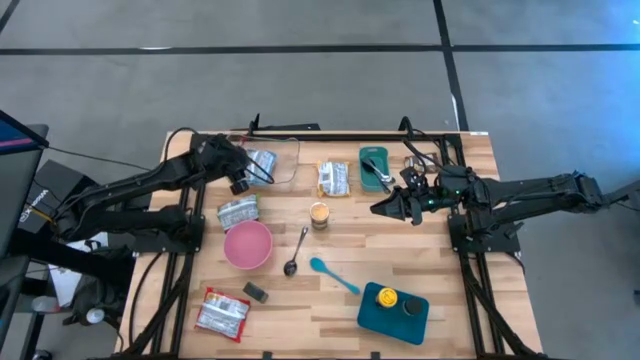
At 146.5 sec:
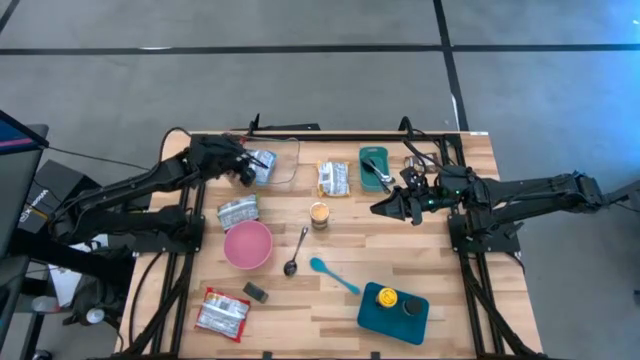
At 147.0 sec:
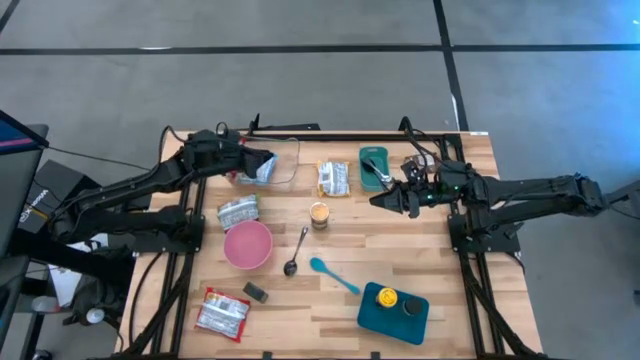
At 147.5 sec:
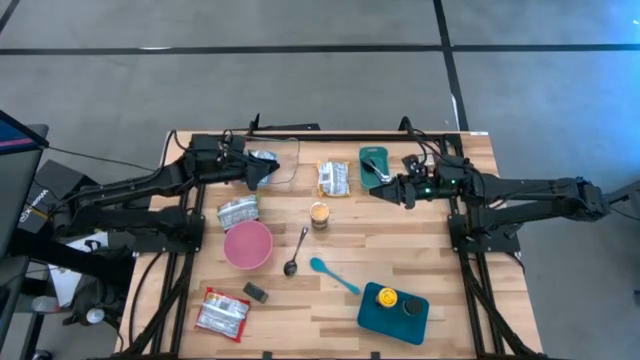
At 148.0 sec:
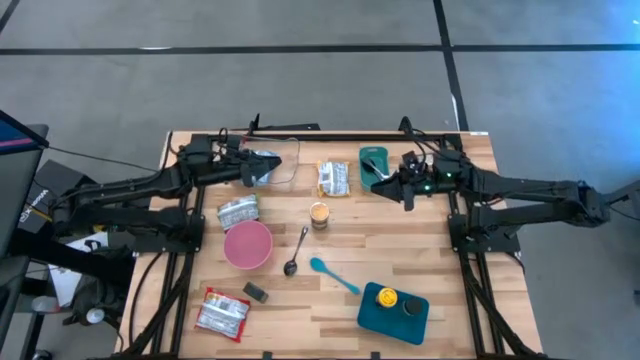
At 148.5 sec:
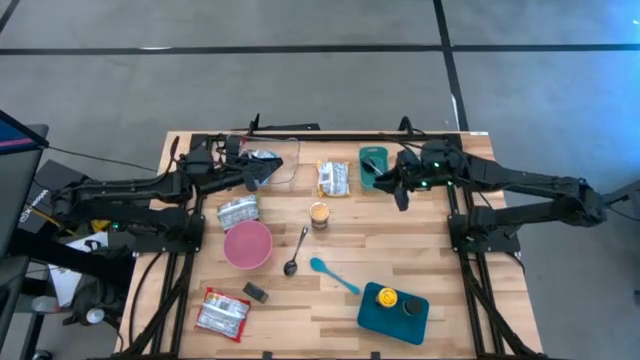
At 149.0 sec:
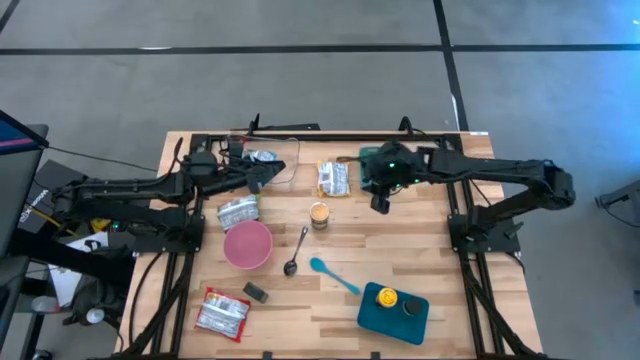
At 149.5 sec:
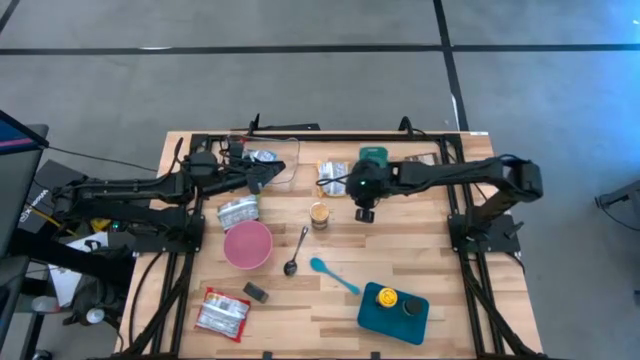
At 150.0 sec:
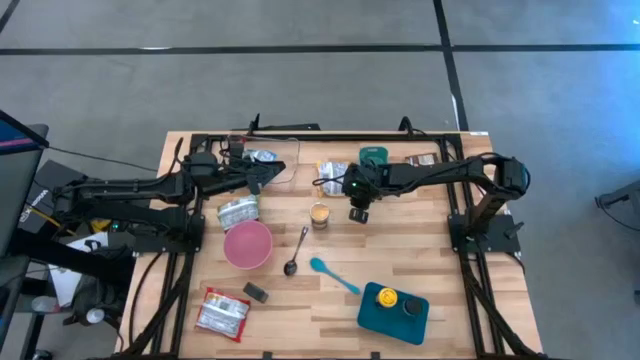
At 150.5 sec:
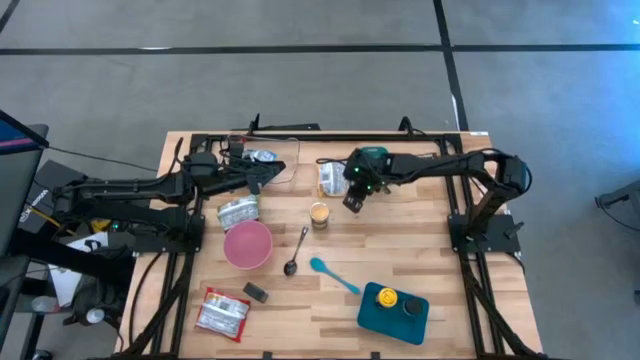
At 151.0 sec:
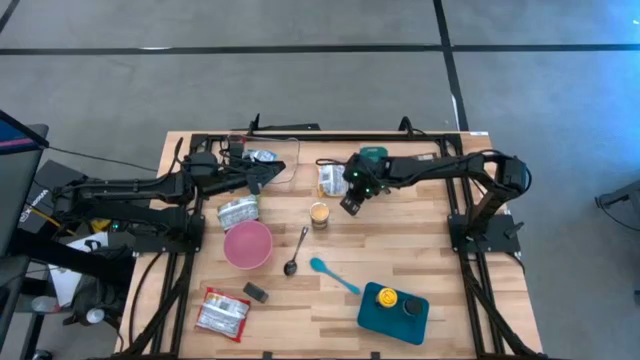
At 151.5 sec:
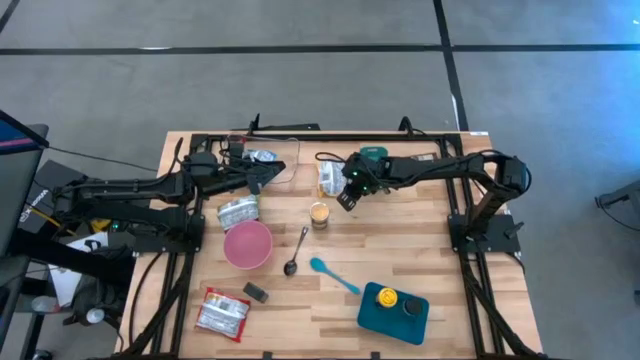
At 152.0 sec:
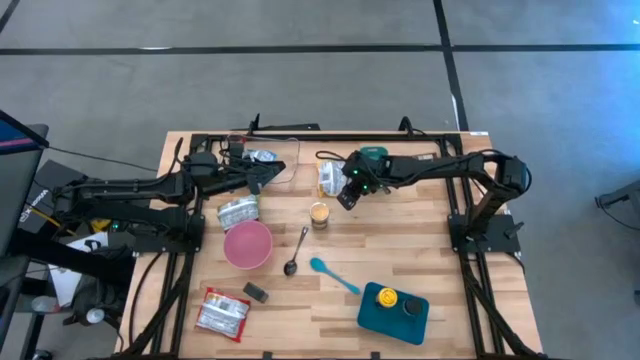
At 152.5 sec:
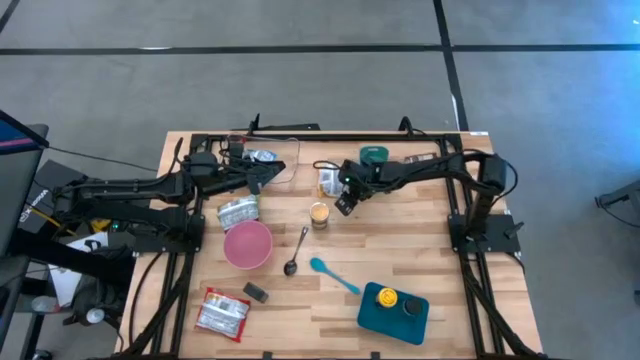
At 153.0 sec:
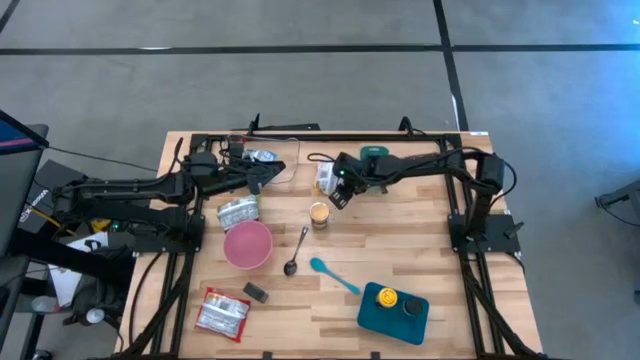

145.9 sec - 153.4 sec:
Task: Pick & Place Food Item
Put the yellow noodle pack into the transparent bin

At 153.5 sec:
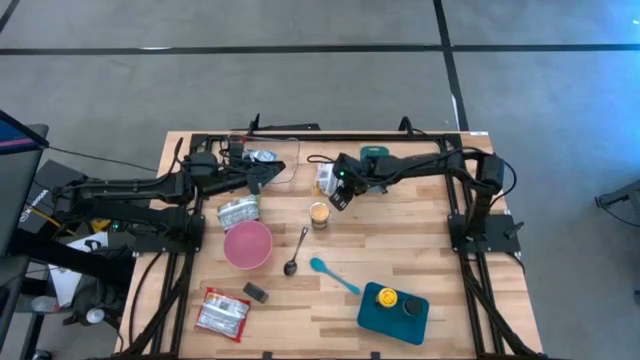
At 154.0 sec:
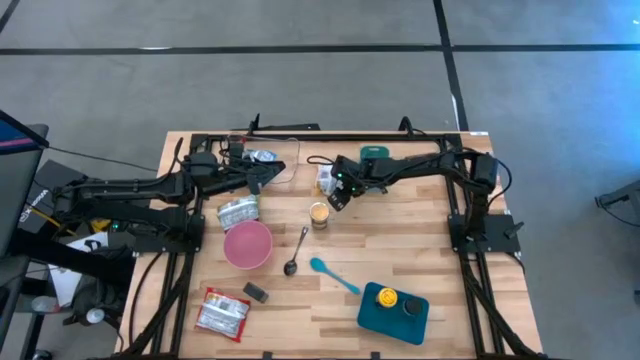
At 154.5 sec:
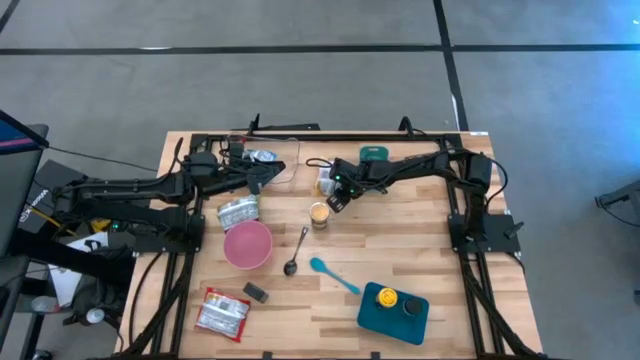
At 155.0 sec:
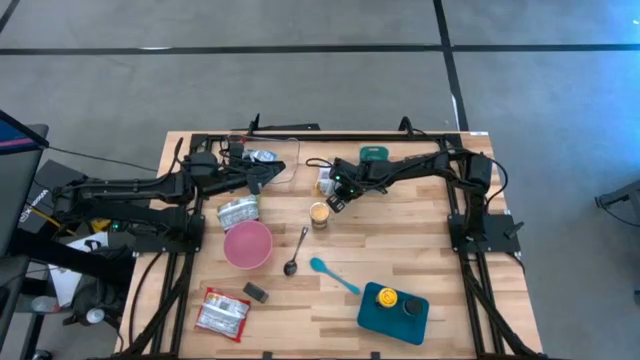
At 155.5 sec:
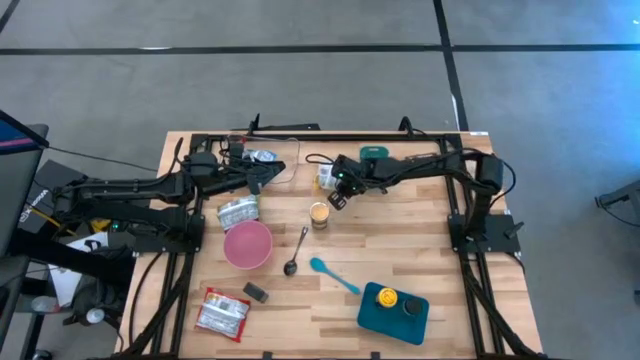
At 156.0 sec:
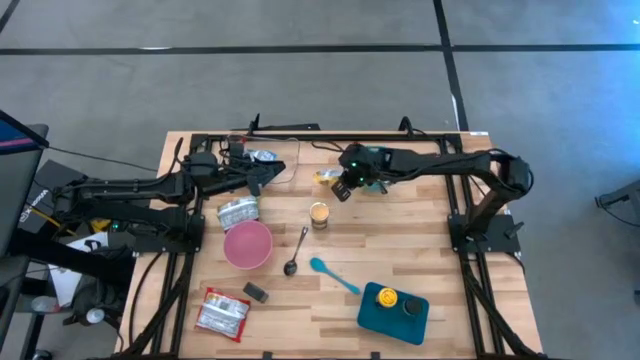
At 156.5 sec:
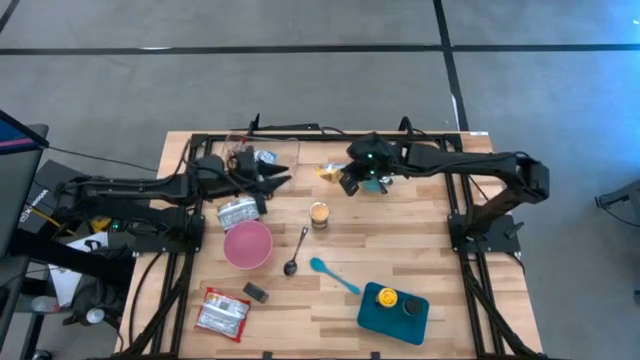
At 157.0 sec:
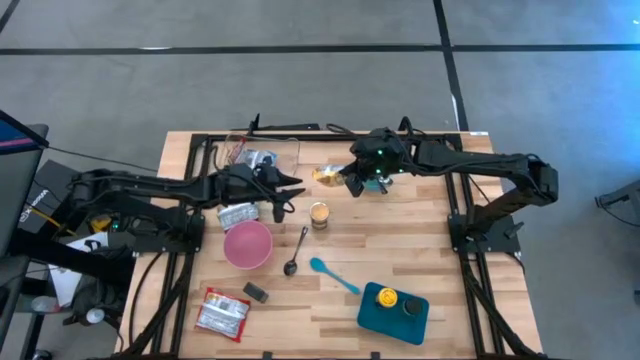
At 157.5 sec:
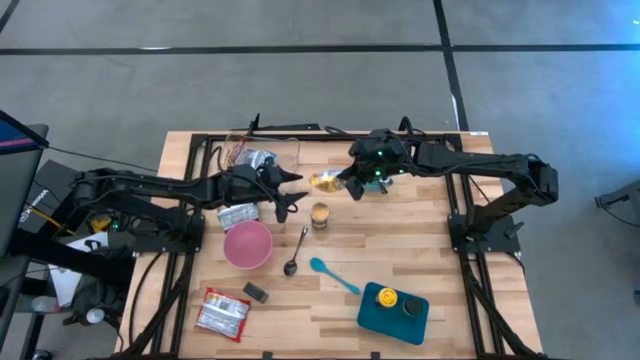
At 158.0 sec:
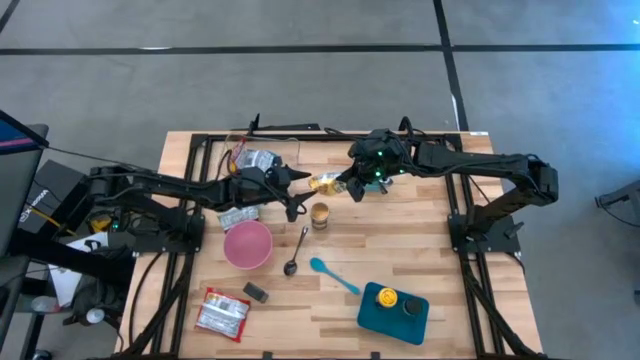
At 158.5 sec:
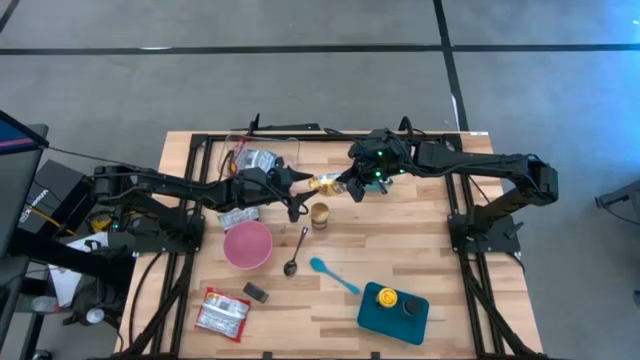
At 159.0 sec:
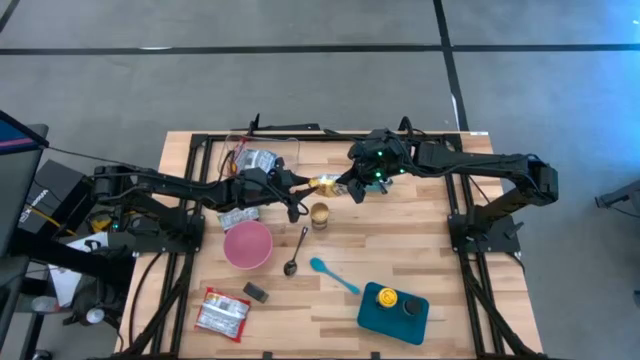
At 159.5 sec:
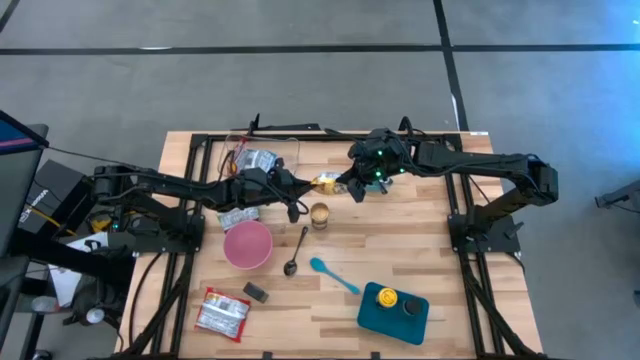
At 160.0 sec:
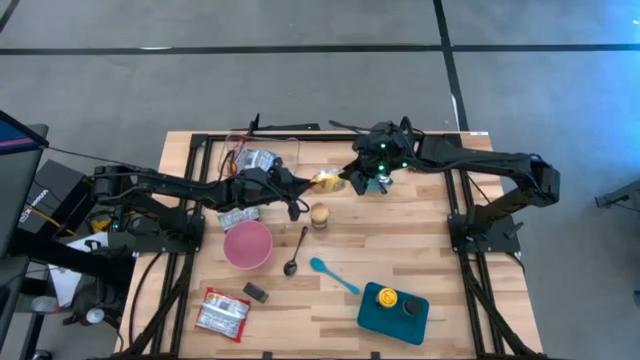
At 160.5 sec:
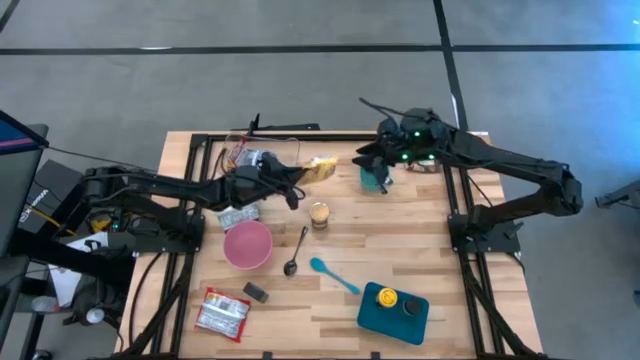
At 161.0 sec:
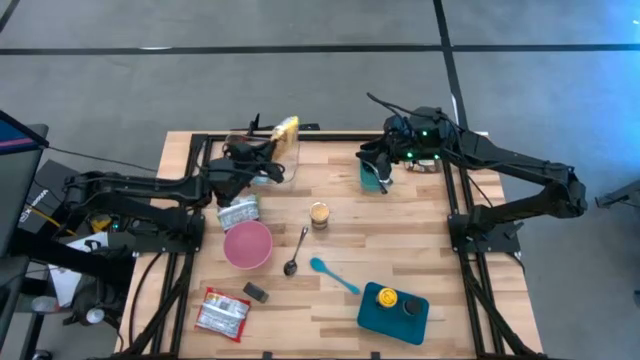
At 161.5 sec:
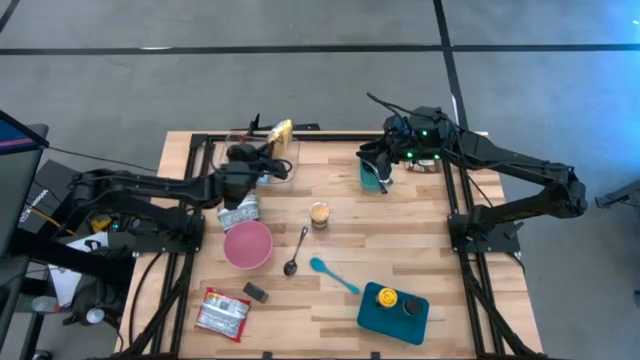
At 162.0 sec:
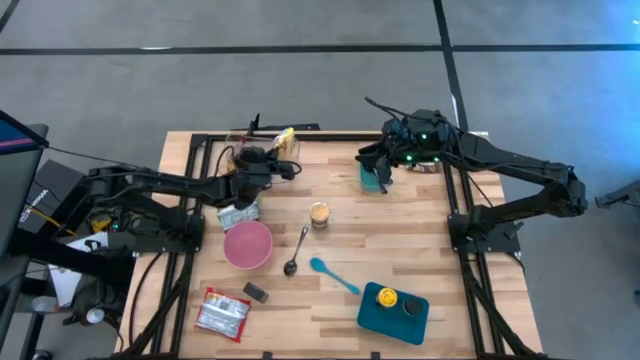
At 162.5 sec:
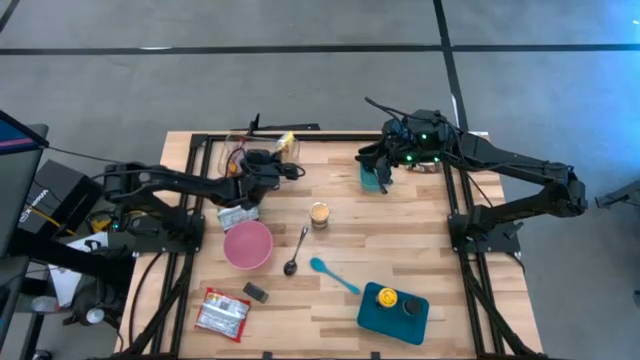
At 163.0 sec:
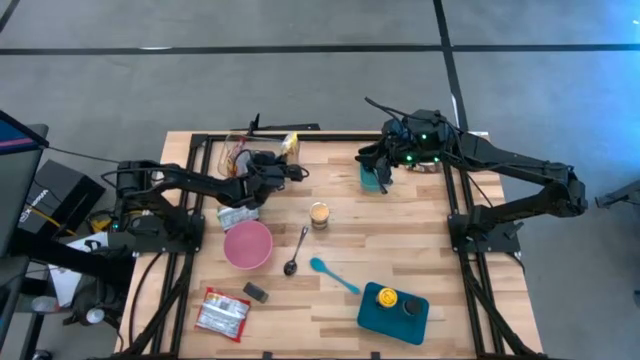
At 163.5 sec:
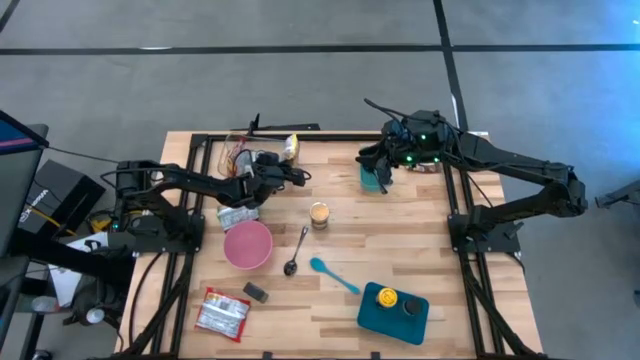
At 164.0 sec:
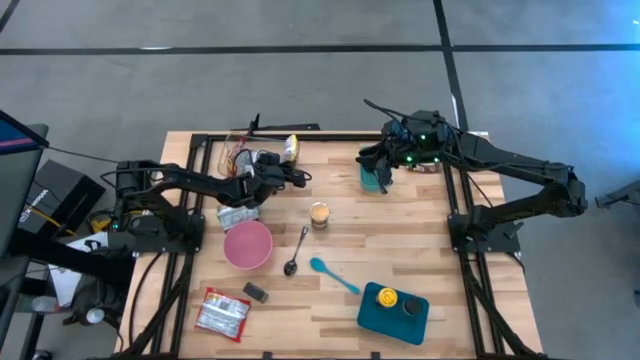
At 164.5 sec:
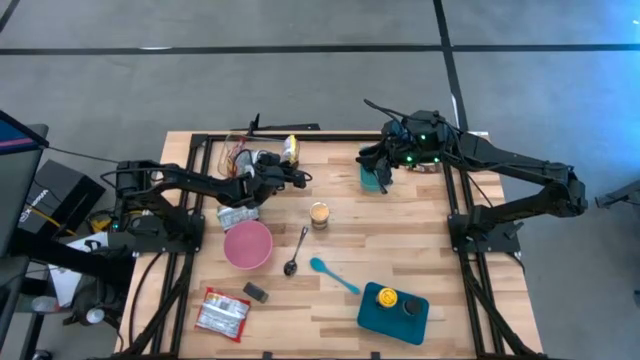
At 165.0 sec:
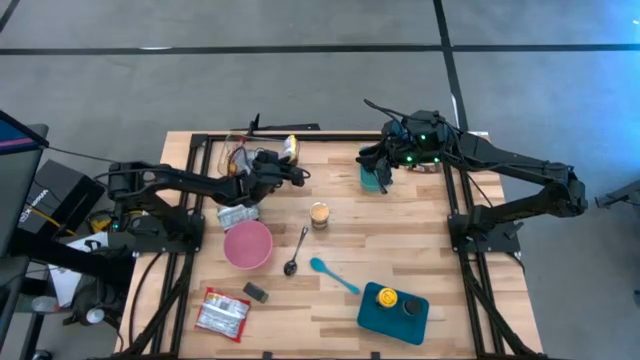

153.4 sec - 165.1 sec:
Put the yellow noodle pack into the transparent bin
